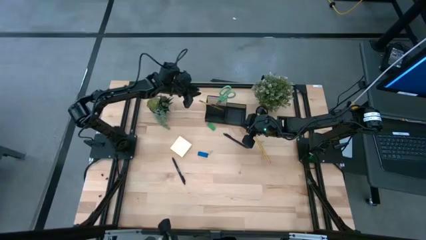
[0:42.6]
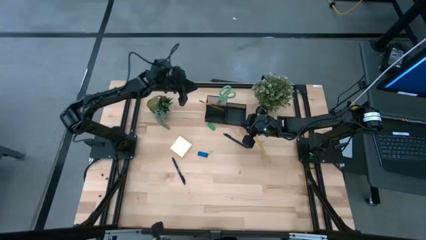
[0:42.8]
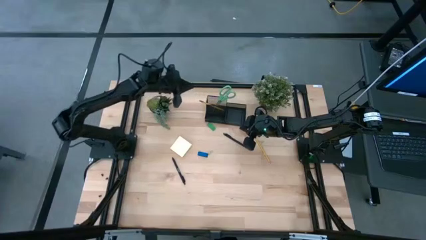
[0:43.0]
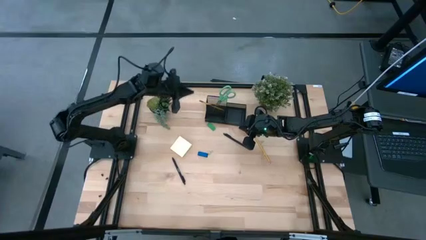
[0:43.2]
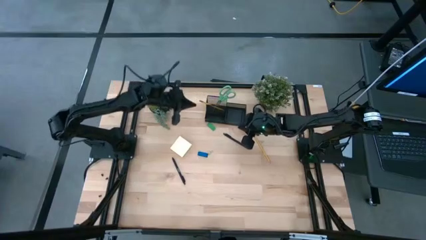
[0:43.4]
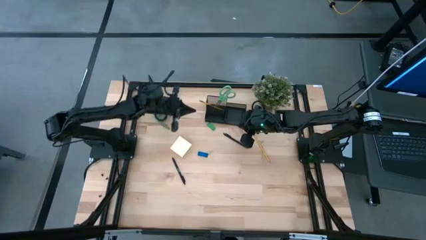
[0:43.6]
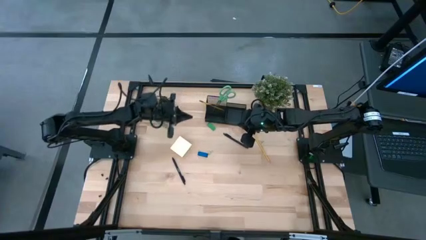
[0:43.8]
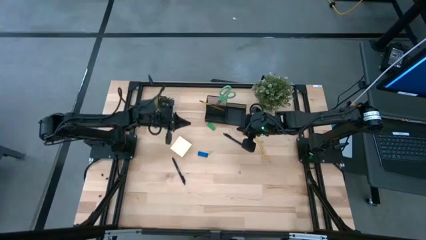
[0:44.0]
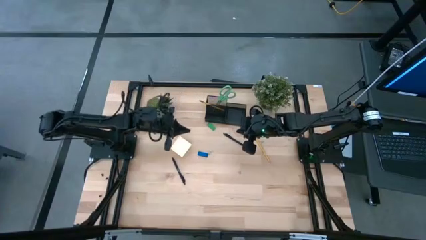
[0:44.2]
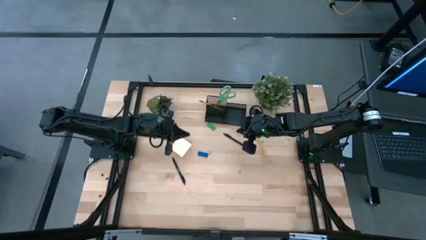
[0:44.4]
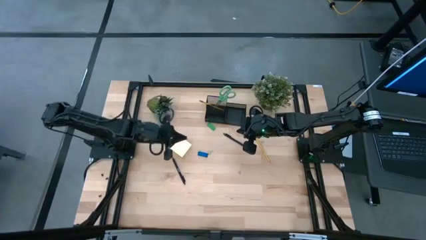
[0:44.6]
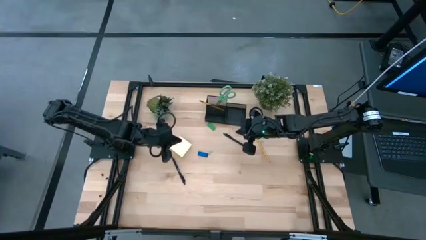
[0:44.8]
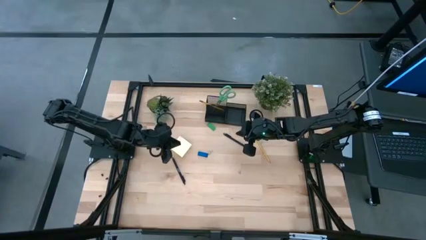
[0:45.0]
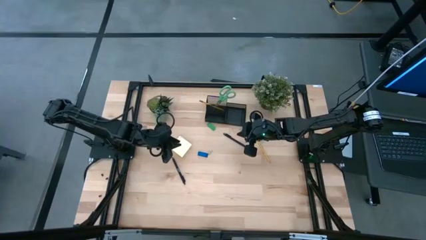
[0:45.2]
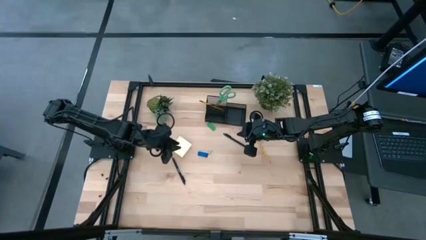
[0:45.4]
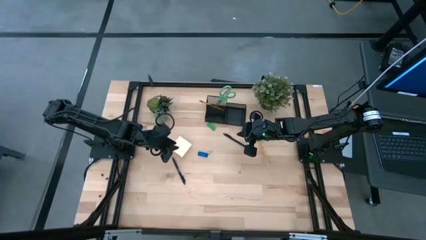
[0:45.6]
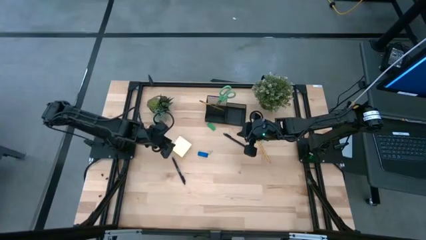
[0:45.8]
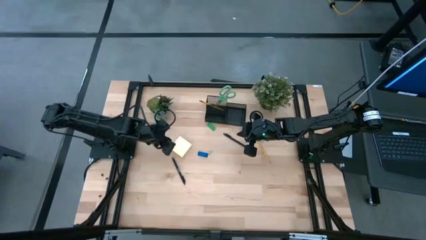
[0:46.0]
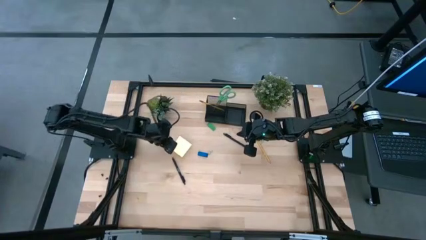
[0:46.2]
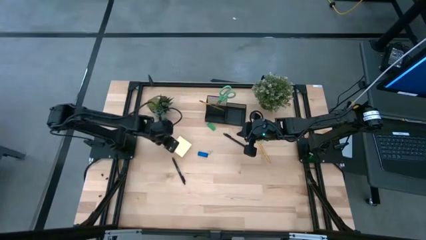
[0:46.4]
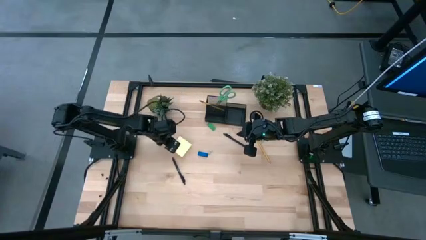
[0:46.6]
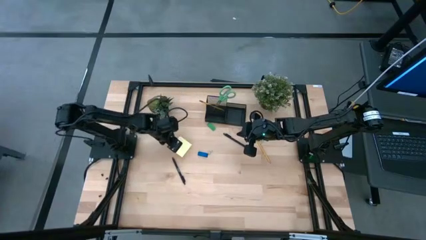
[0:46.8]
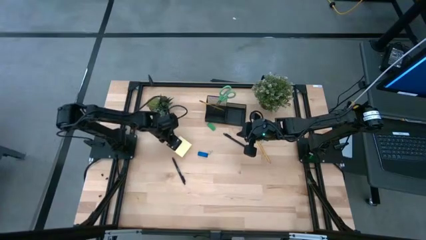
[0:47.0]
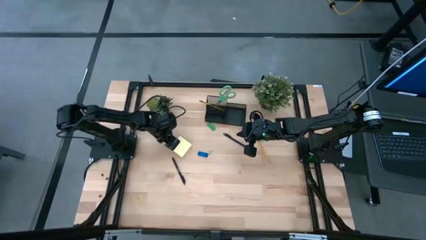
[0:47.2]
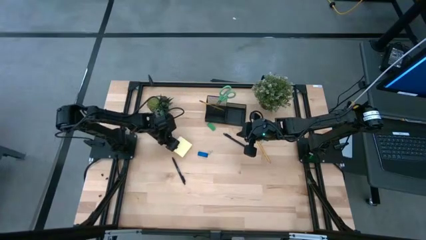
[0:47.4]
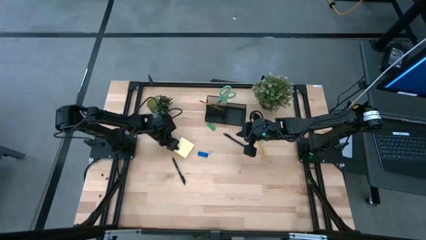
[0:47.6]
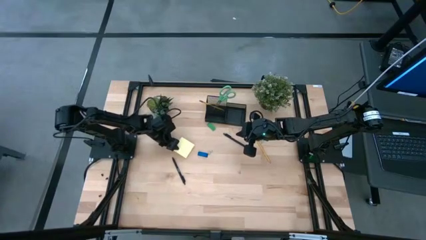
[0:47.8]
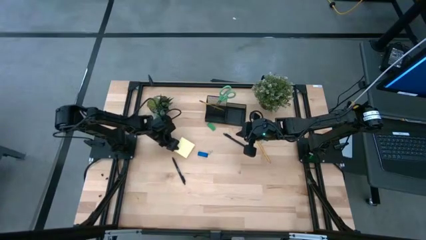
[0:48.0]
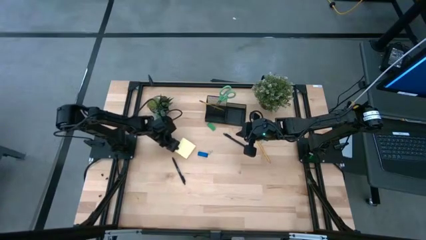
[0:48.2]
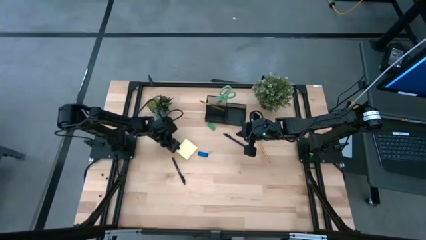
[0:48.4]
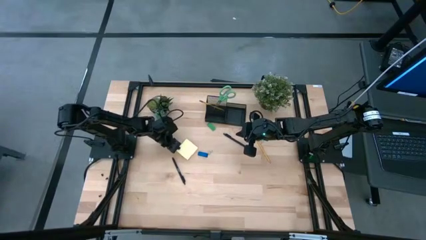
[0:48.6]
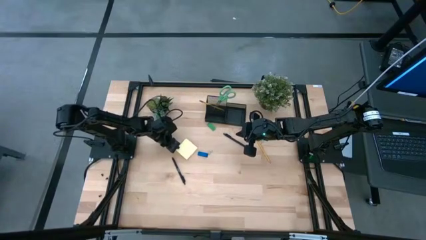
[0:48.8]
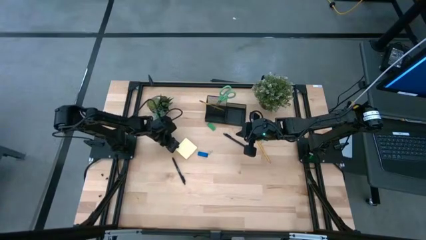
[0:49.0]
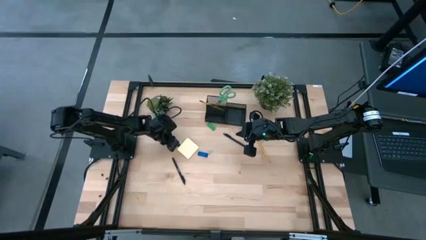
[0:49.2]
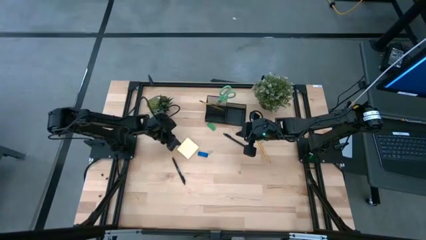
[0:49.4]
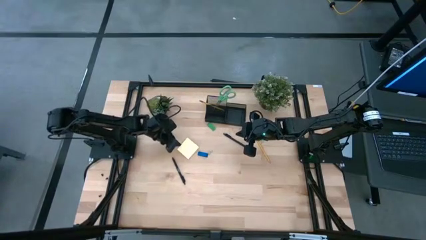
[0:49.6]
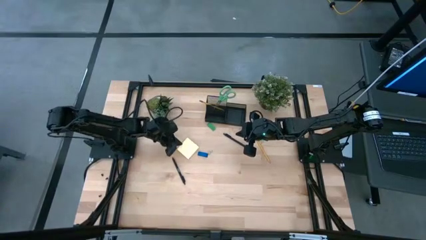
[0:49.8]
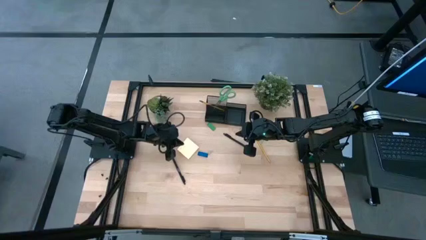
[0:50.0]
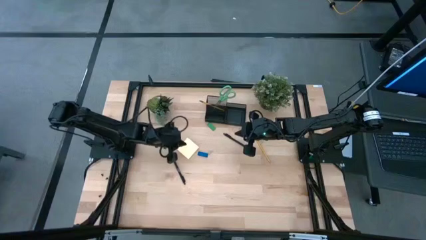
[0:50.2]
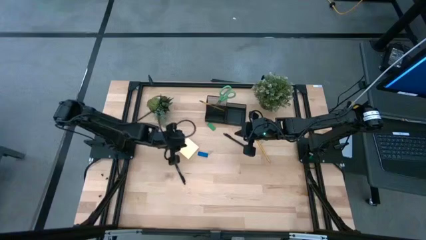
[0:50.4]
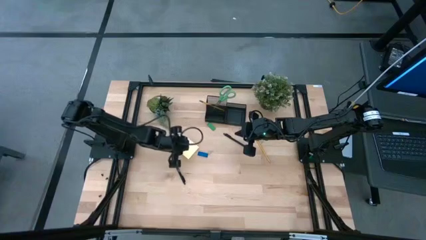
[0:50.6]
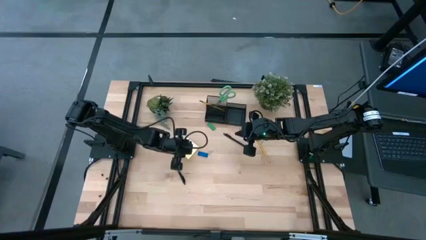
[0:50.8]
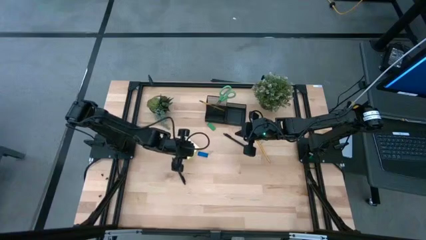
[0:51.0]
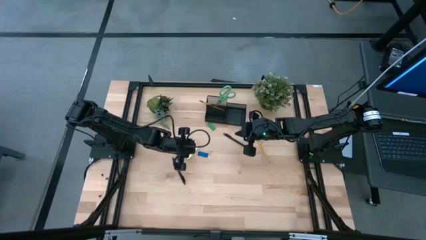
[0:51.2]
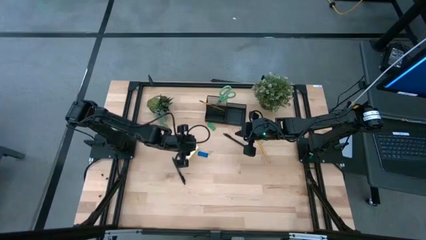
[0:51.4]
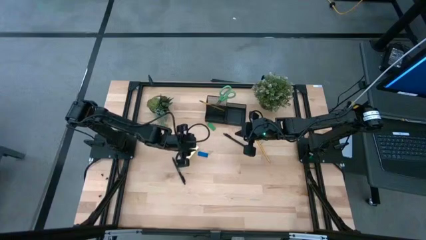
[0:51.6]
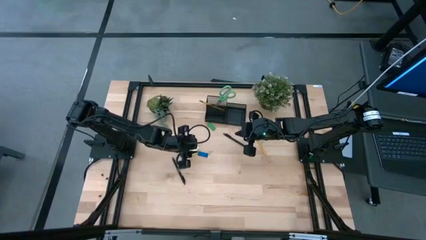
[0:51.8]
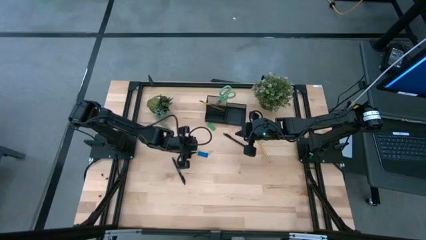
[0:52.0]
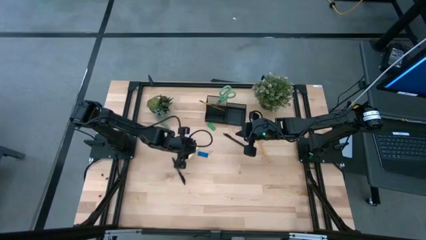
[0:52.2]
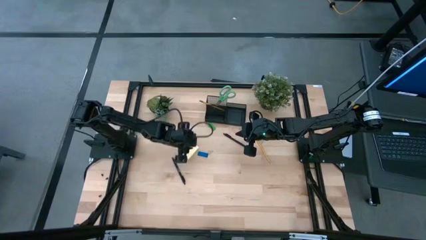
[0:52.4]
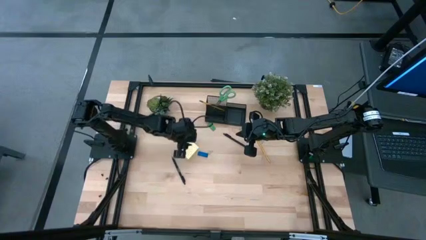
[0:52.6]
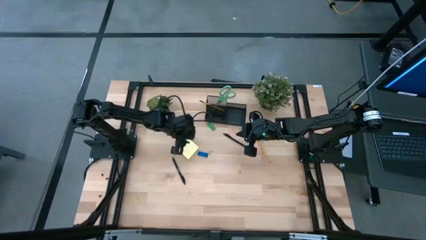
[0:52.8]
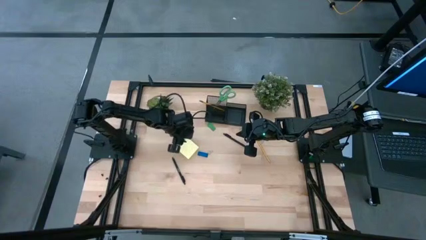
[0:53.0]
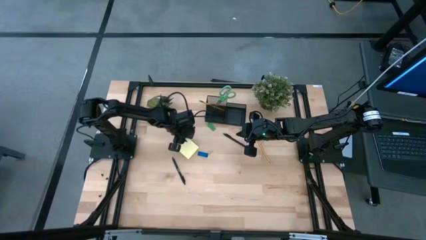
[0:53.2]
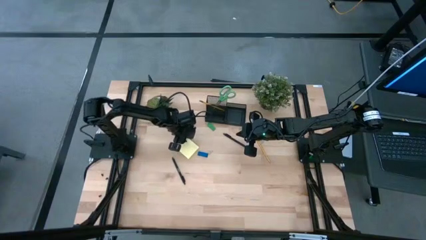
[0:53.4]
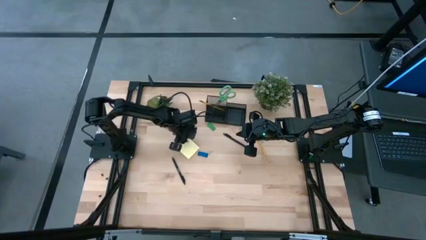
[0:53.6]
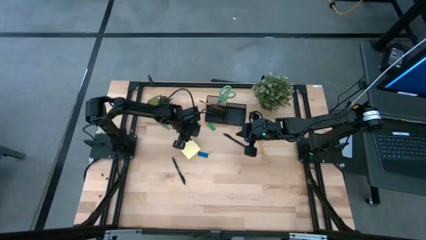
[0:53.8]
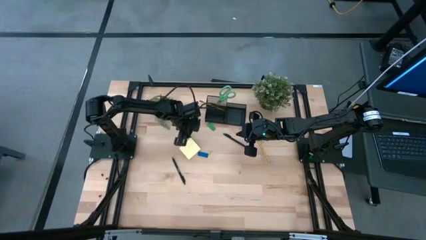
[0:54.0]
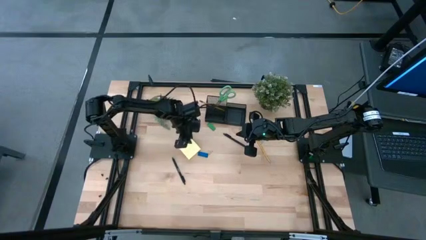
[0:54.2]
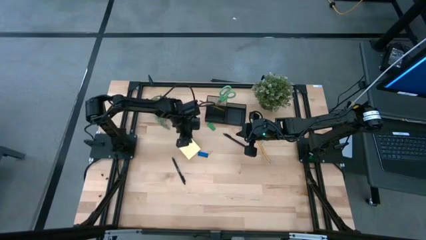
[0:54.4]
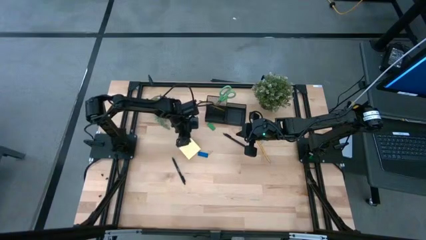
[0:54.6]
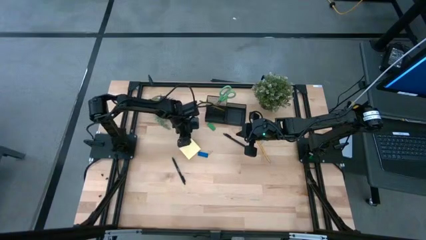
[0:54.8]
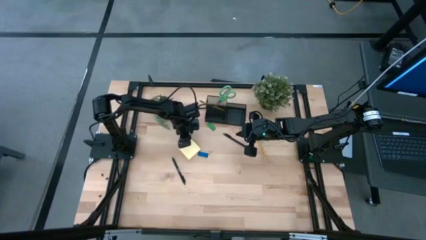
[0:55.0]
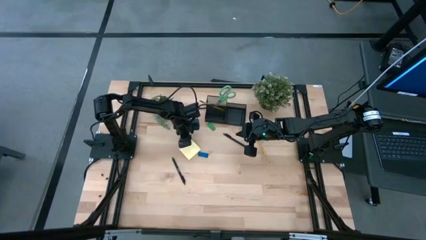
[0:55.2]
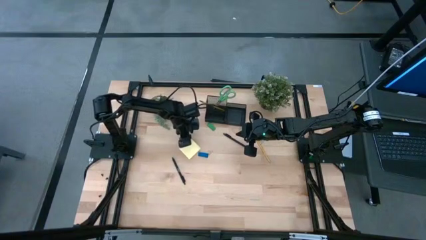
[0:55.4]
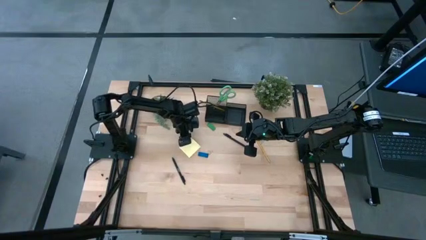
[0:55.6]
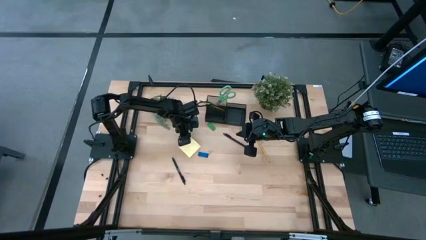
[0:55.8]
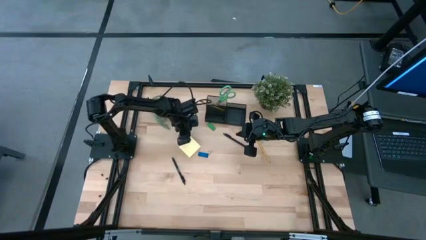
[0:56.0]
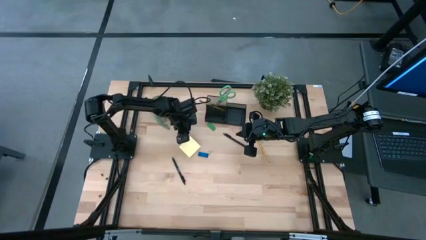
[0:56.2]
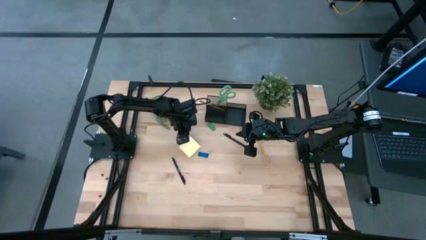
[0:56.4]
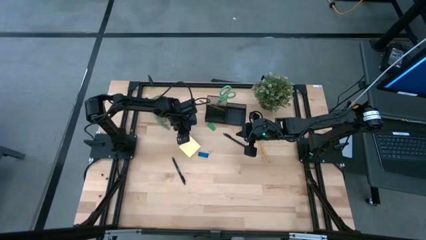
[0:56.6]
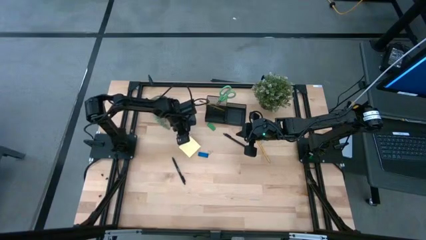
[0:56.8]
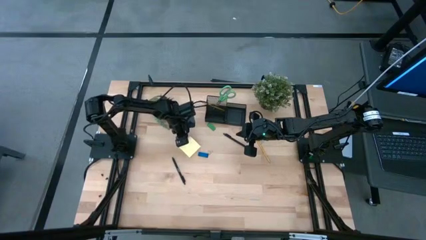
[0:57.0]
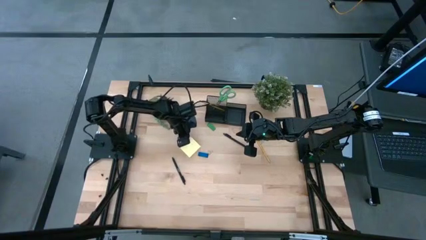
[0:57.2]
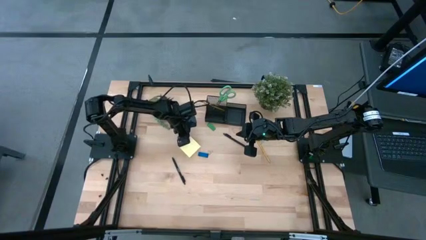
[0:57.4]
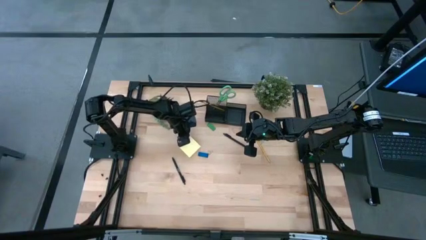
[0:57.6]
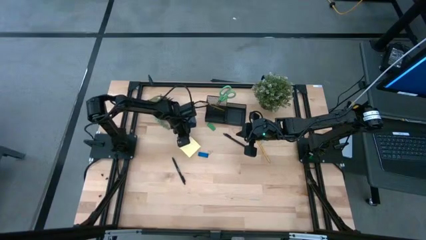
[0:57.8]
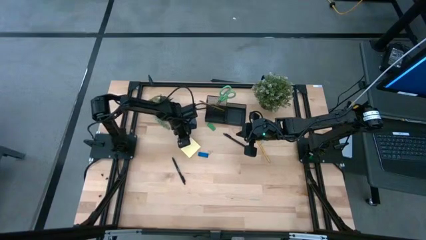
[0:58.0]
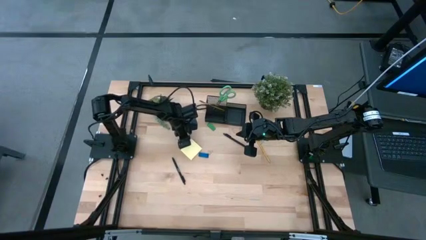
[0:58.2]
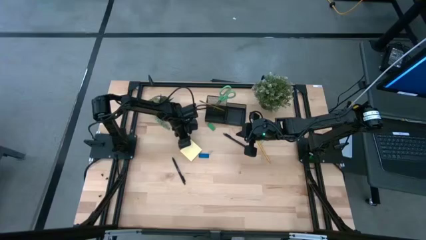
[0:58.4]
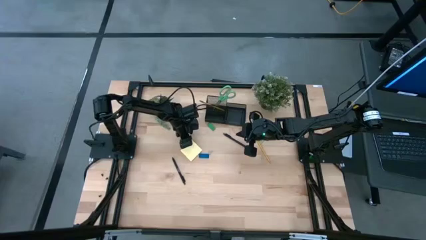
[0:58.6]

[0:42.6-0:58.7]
Task: Pick and place office supplies into organizer
Put the yellow sticky notes into the black desk organizer
